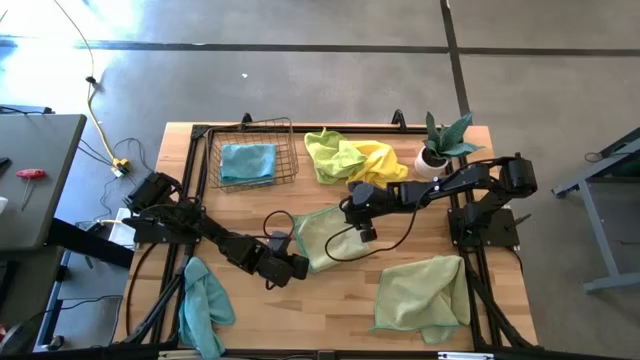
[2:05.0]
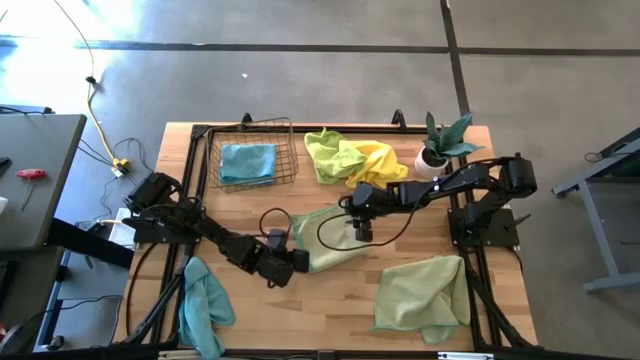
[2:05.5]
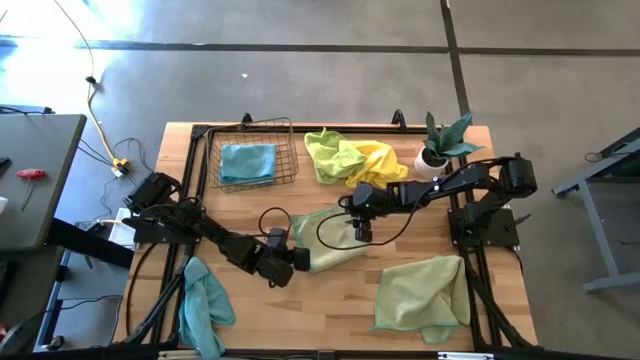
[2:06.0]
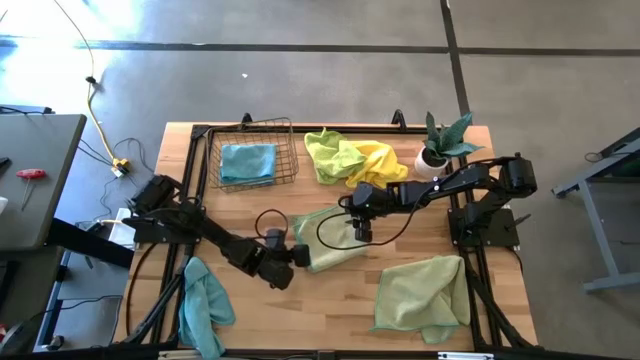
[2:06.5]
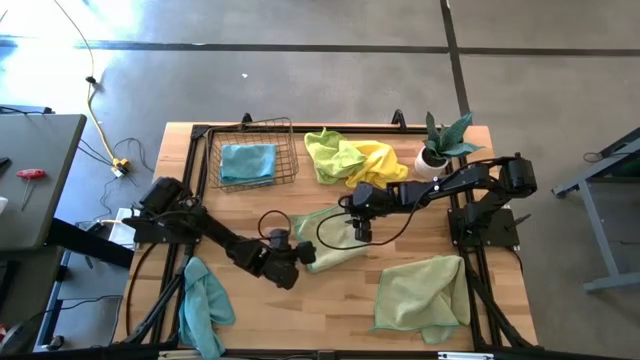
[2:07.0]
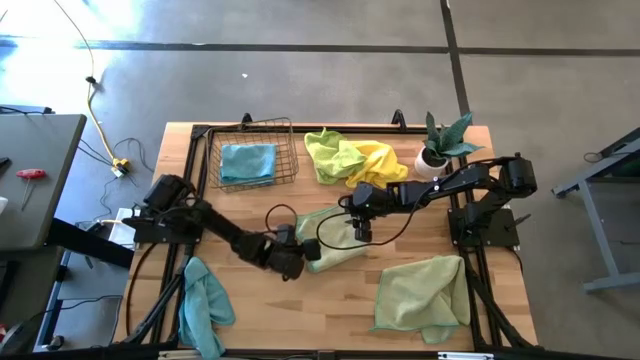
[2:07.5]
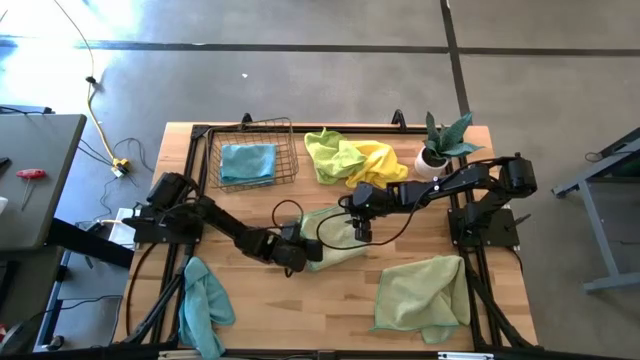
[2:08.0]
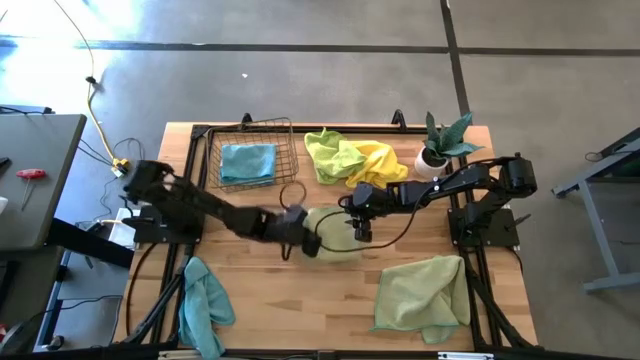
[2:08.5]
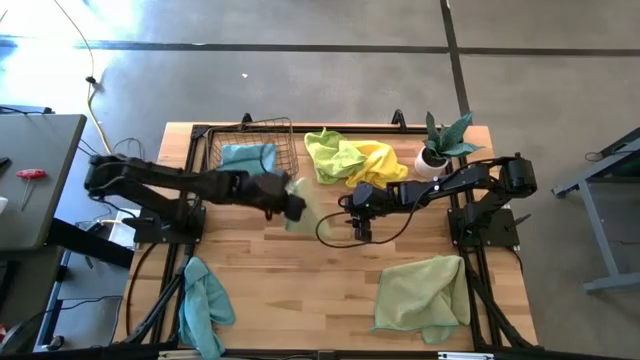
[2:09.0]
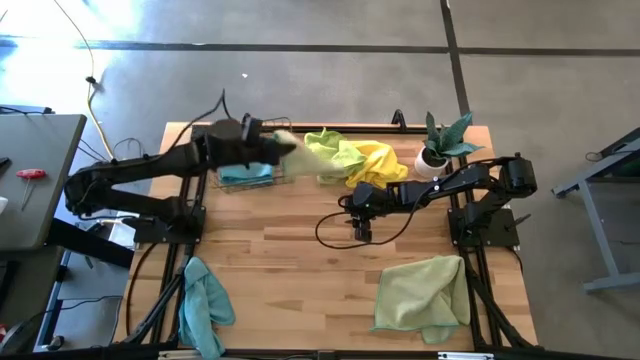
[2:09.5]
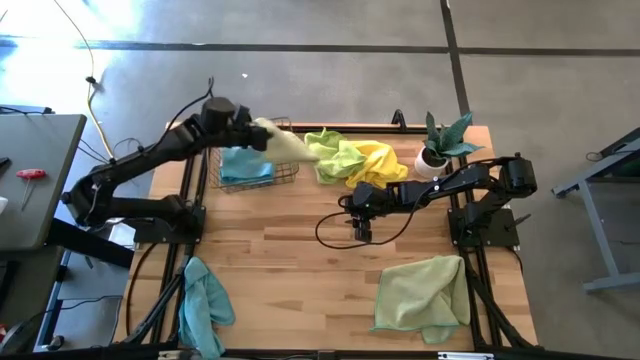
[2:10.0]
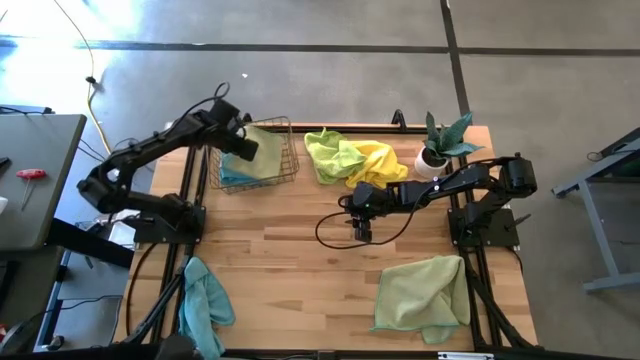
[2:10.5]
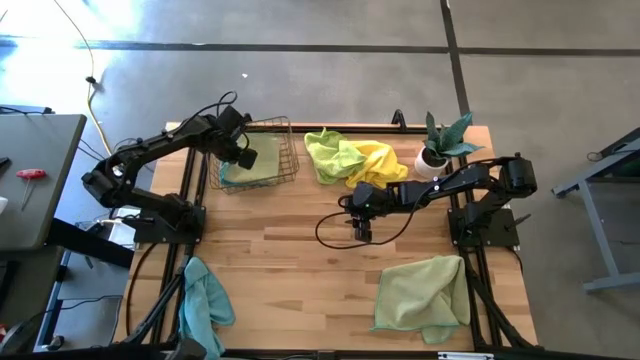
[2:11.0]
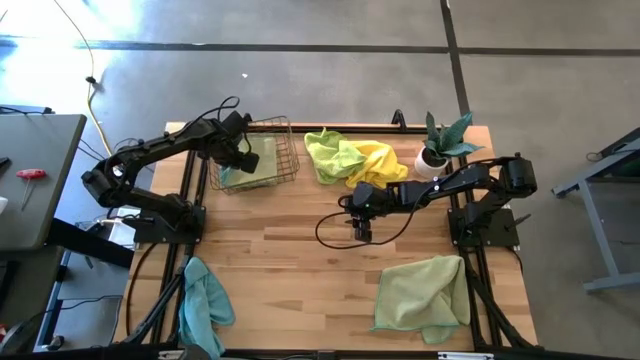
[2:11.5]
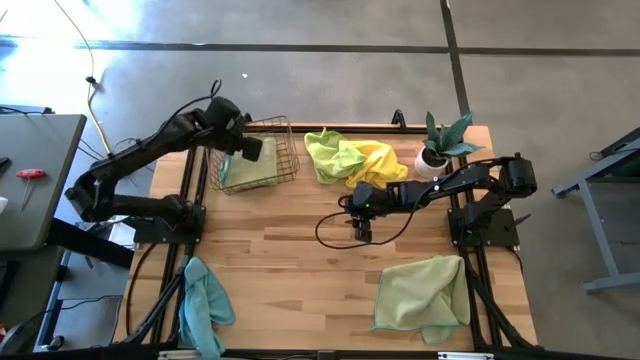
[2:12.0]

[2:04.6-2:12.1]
Task: Fold microfiber towels
Put the folded green towel into the wire basket

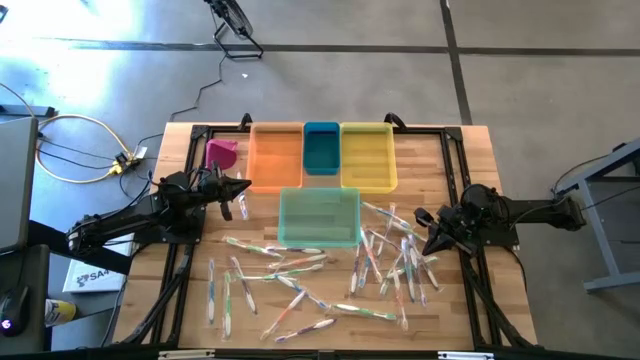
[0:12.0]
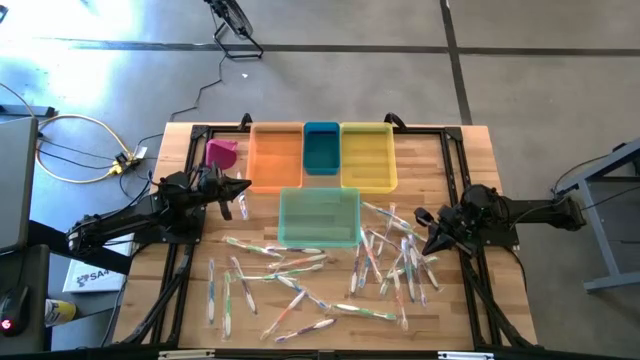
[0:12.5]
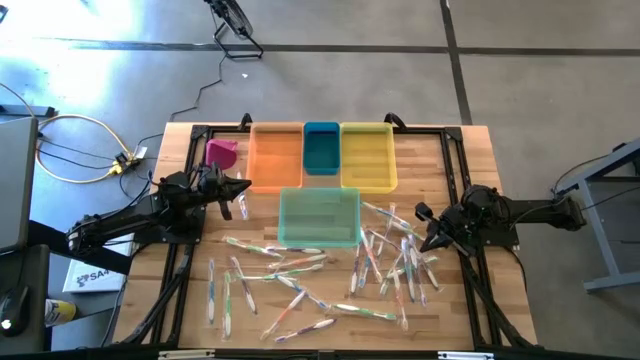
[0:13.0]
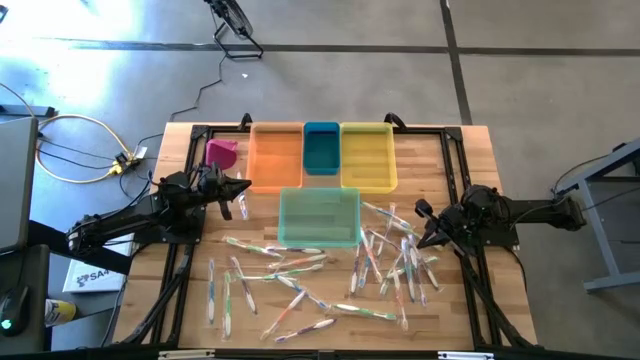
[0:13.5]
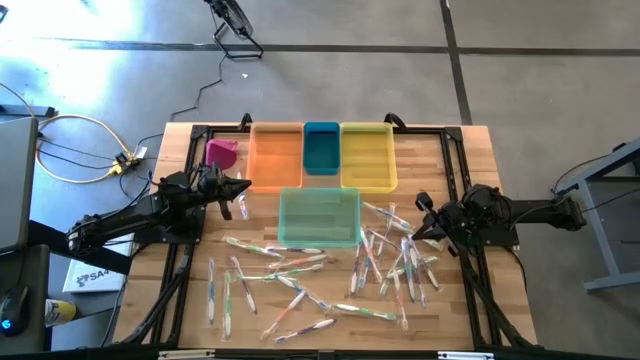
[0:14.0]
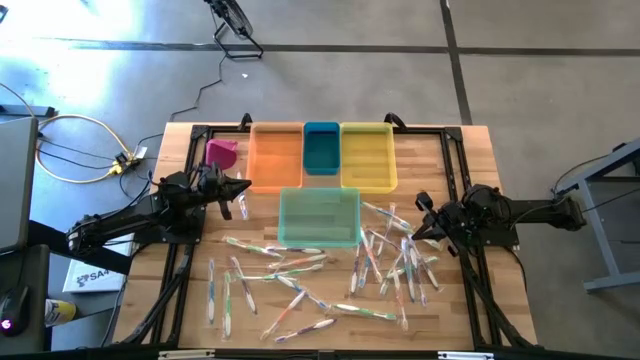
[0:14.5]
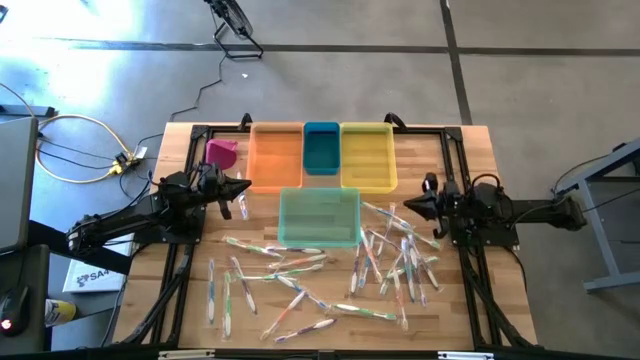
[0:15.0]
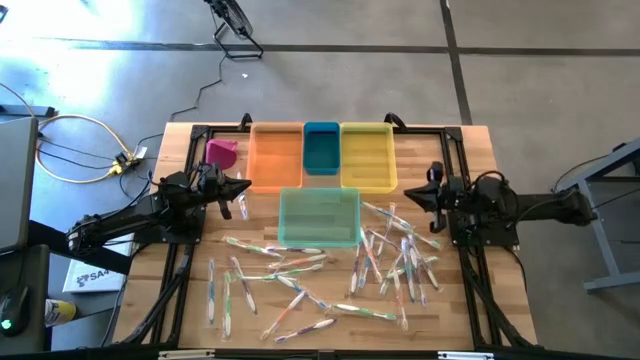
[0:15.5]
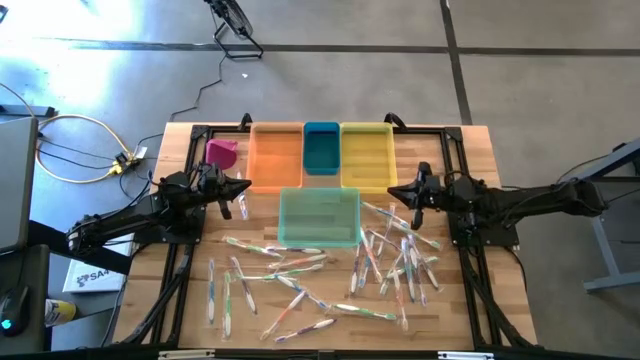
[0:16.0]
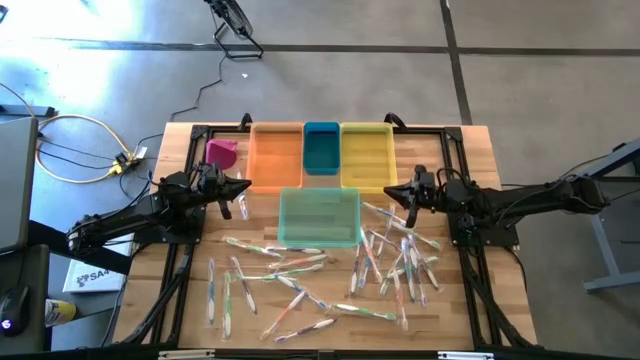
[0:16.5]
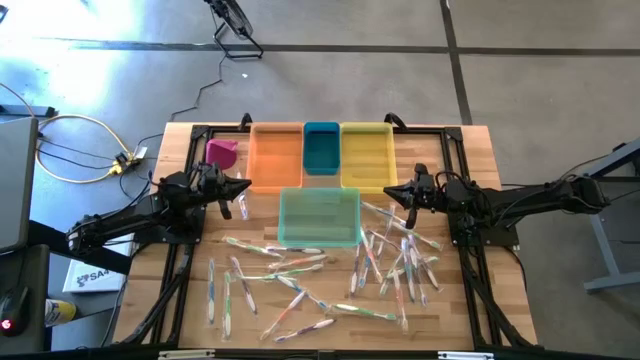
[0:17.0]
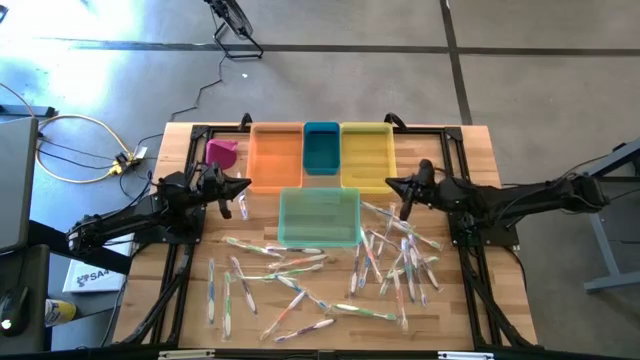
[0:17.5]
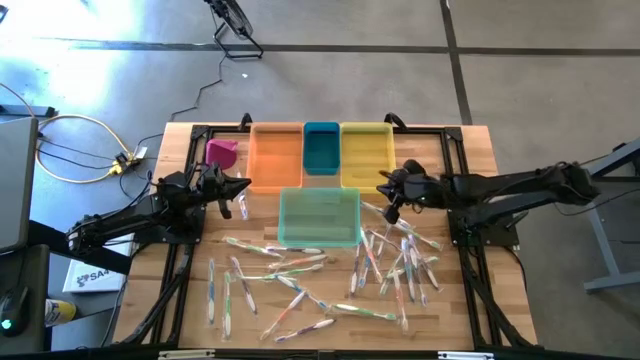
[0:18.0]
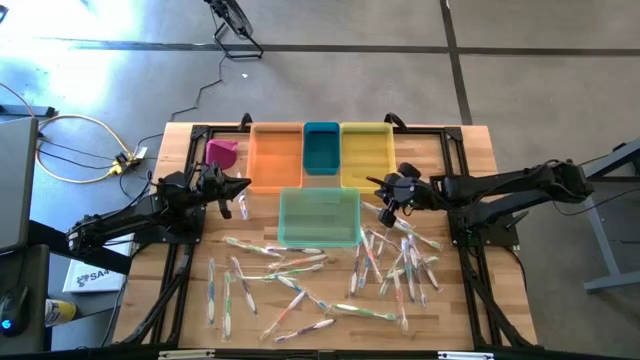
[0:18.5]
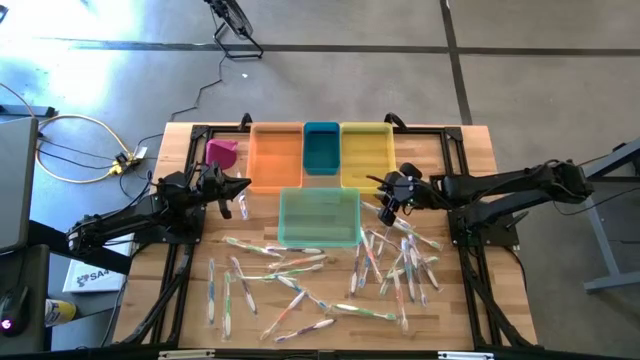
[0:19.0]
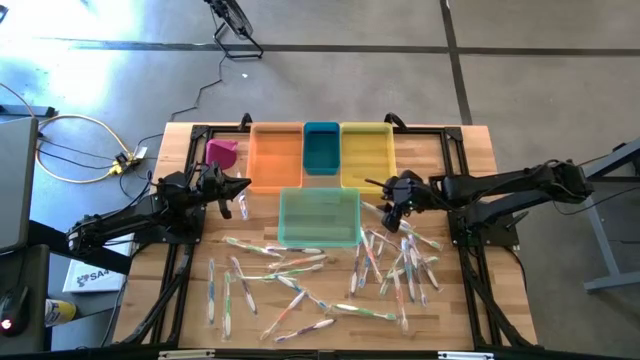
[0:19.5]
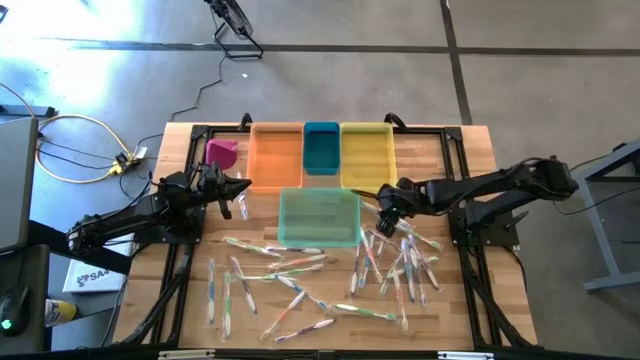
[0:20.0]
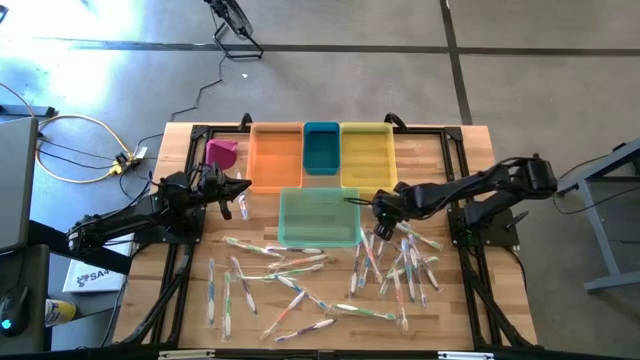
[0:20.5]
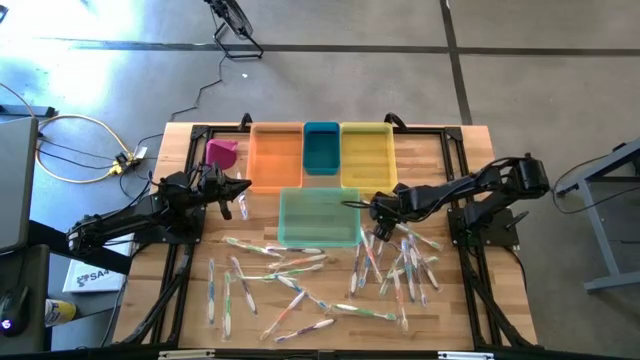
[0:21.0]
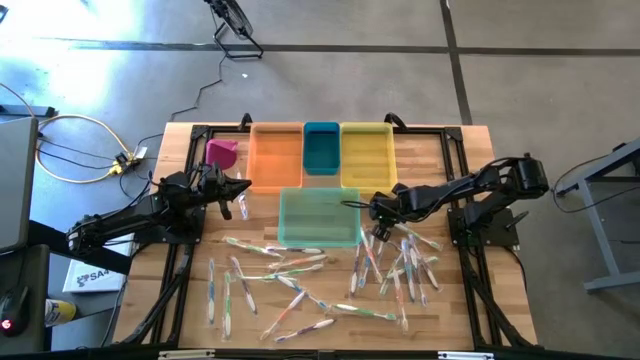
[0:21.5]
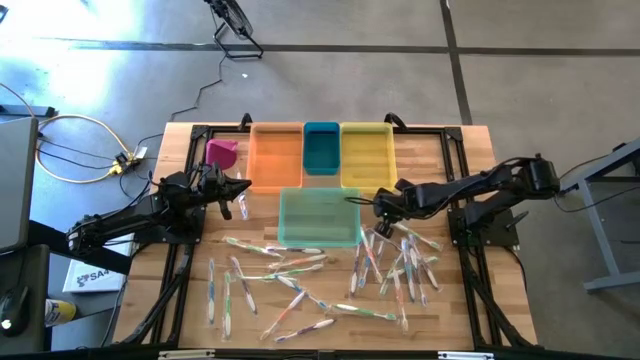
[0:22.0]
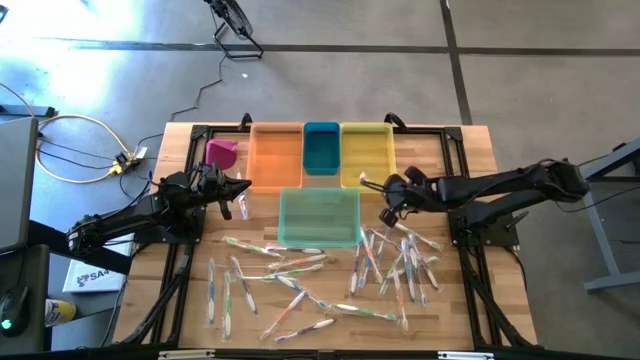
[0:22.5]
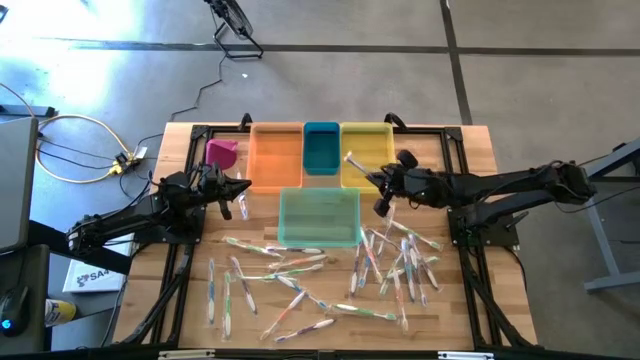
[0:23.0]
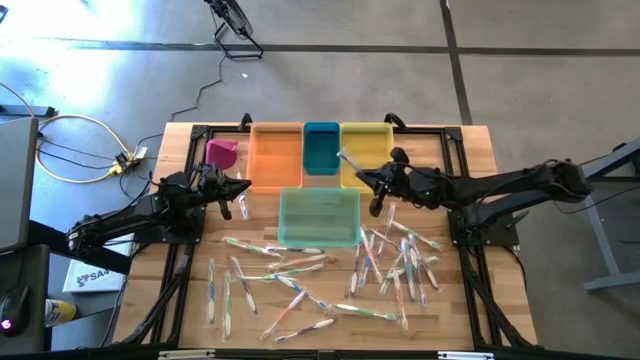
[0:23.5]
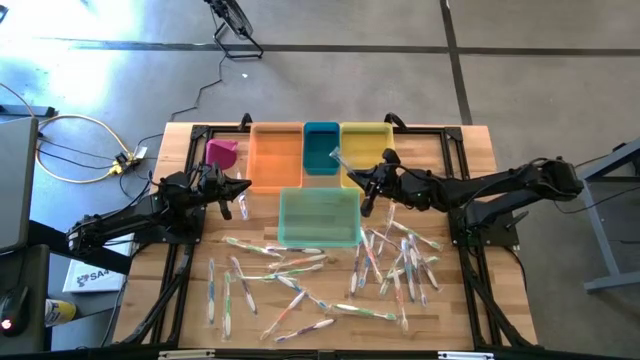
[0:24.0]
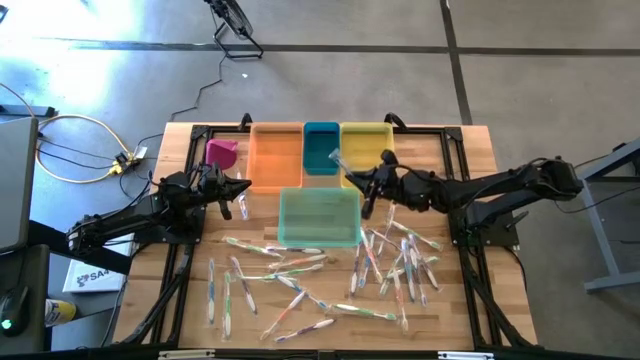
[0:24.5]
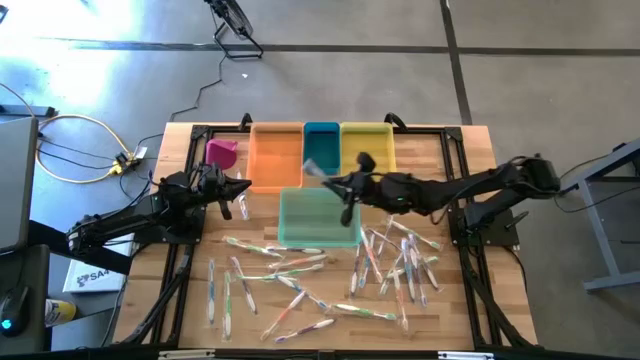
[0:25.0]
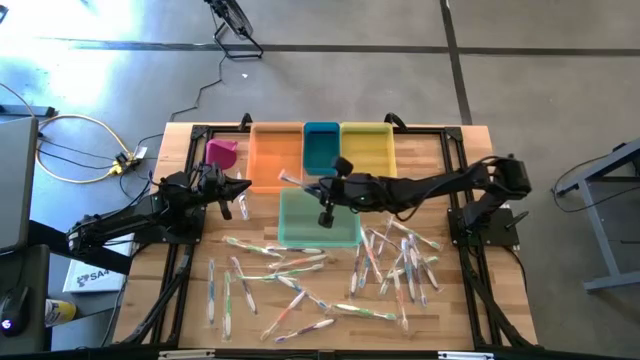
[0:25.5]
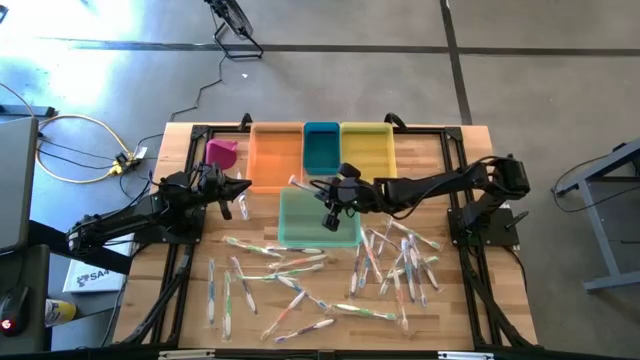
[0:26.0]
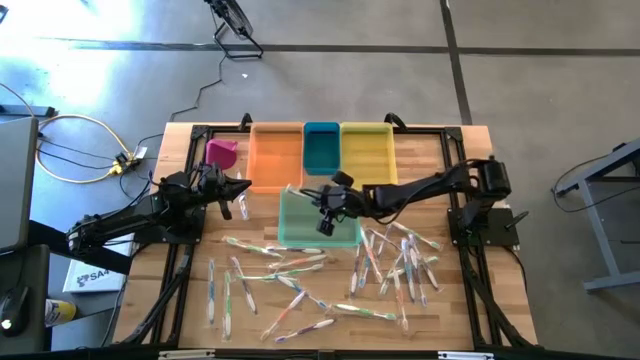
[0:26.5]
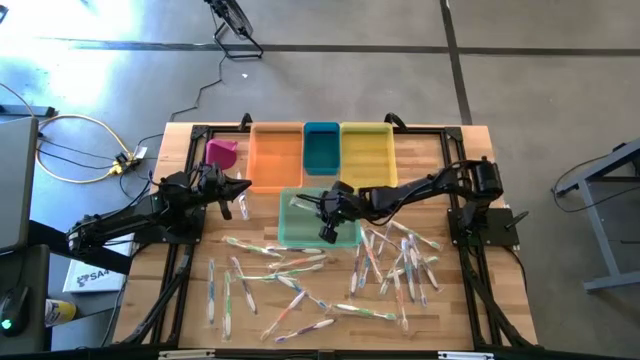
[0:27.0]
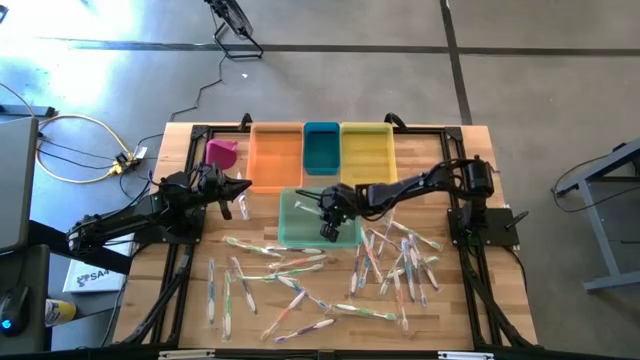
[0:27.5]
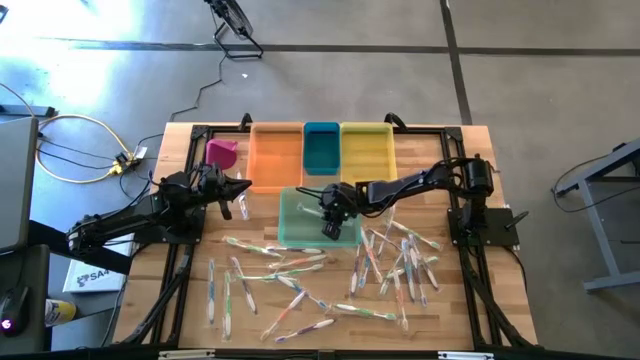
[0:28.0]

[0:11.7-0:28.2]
Task: Pick & Place Toothbrushes
Put the blue toothbrush into the green bin
